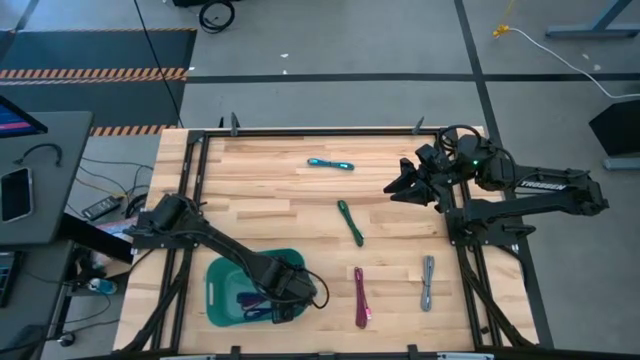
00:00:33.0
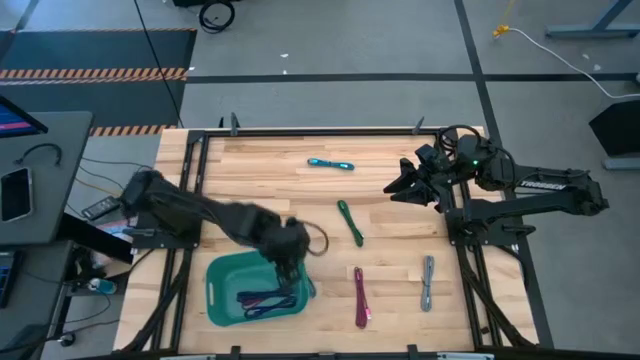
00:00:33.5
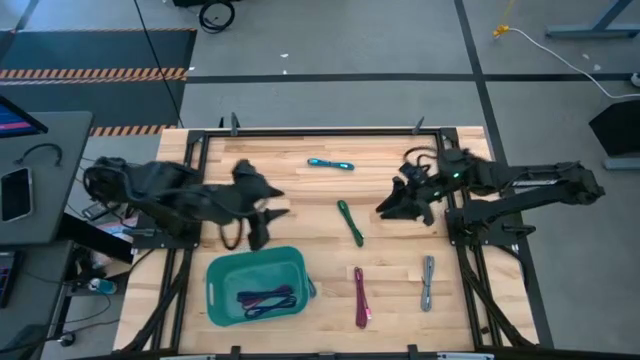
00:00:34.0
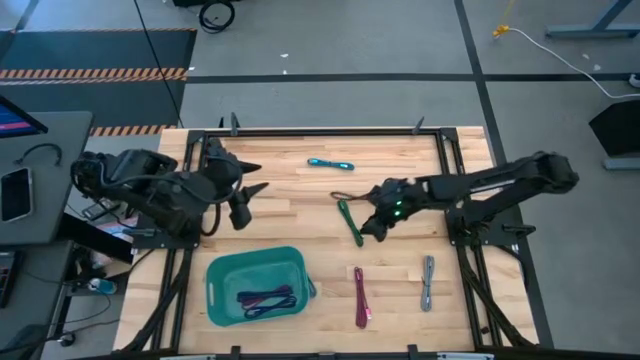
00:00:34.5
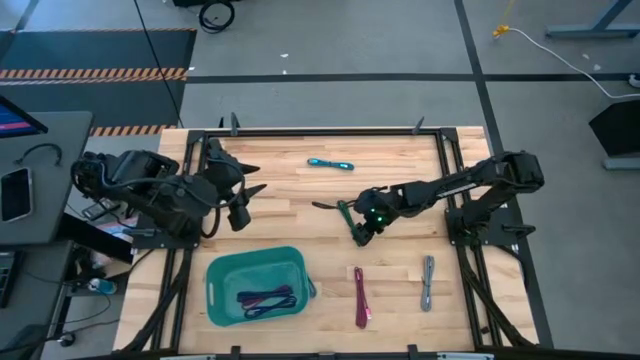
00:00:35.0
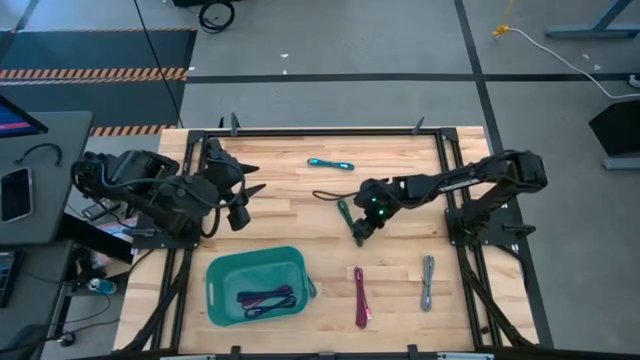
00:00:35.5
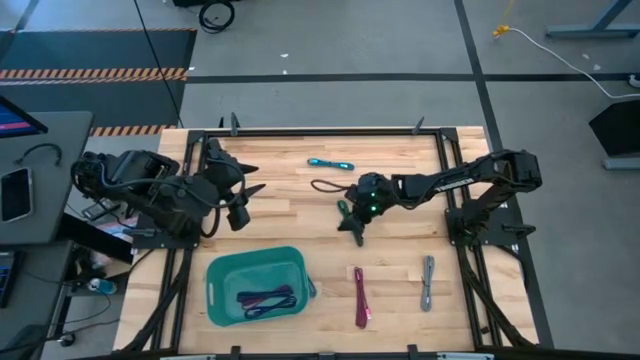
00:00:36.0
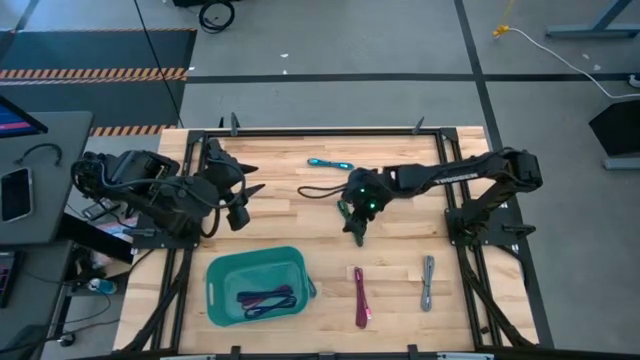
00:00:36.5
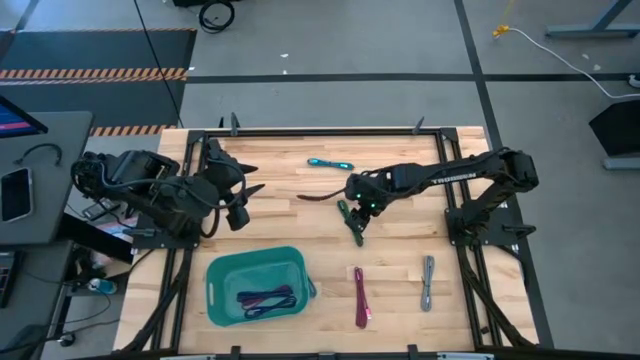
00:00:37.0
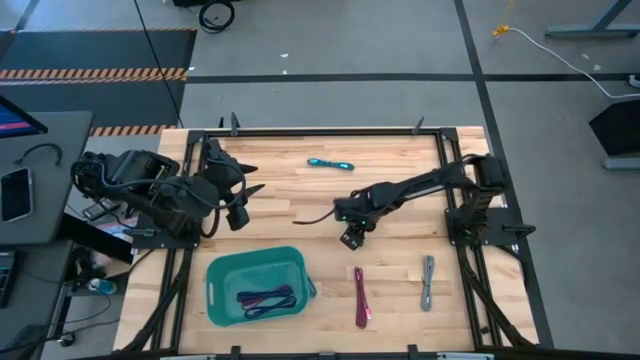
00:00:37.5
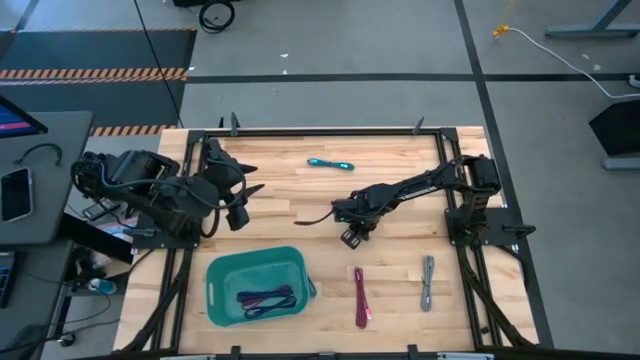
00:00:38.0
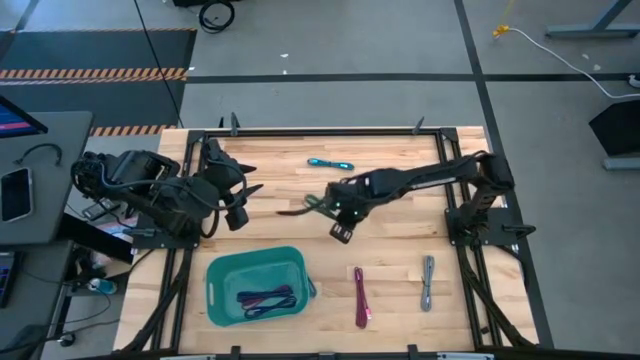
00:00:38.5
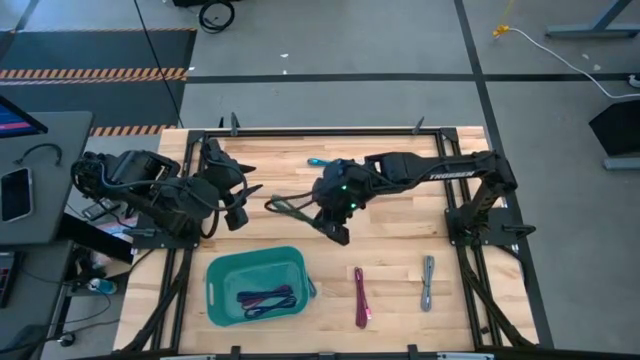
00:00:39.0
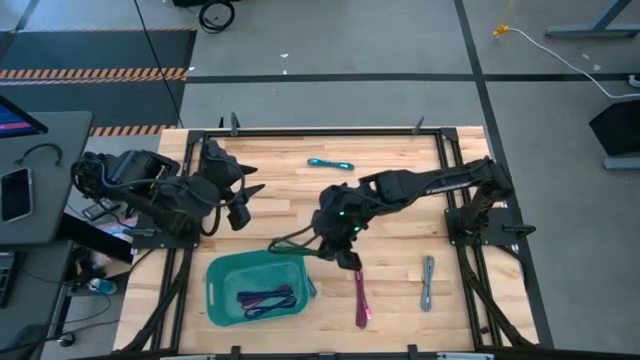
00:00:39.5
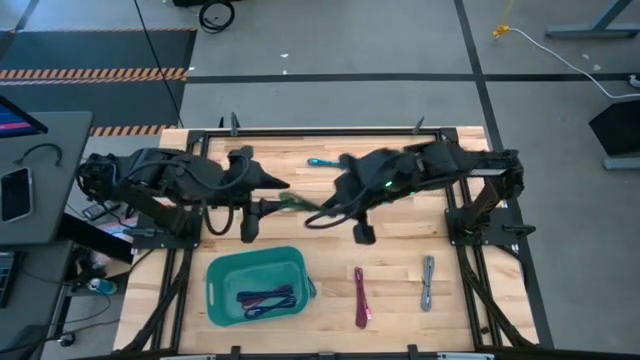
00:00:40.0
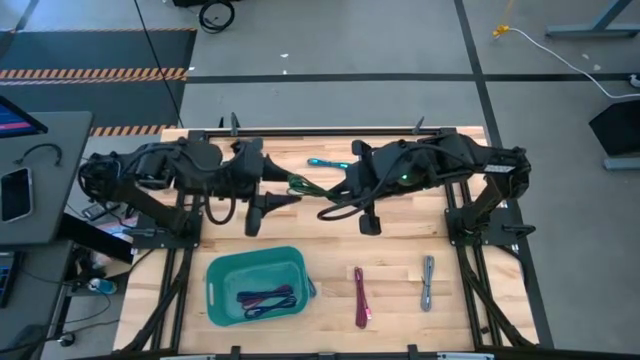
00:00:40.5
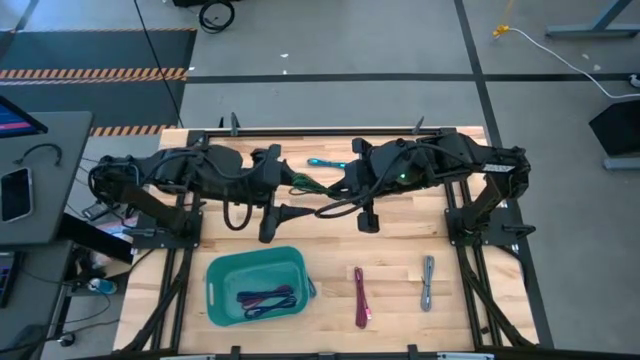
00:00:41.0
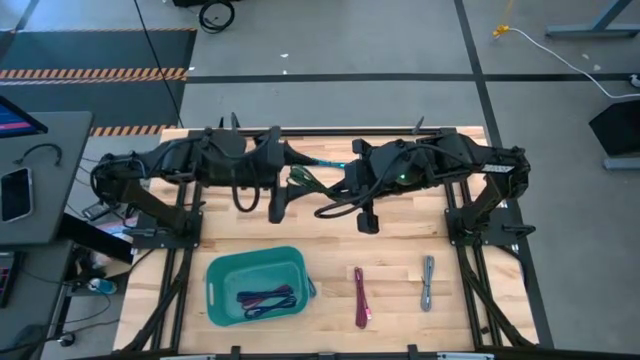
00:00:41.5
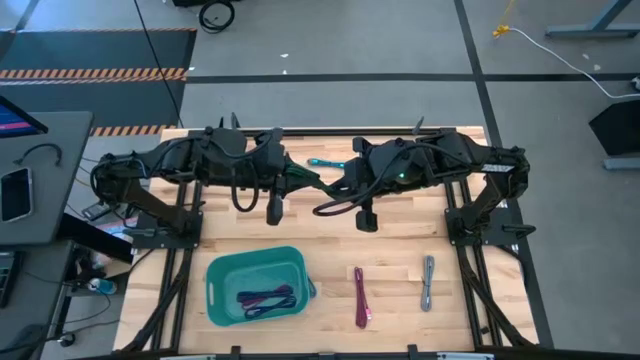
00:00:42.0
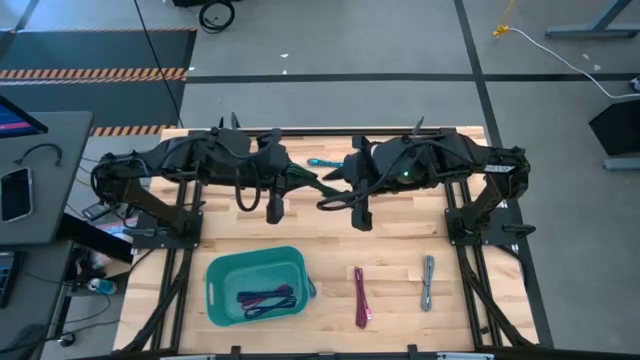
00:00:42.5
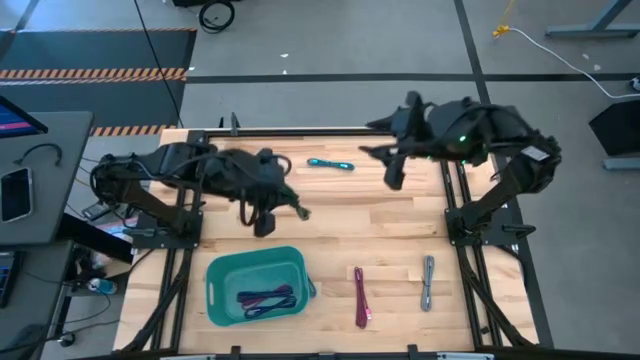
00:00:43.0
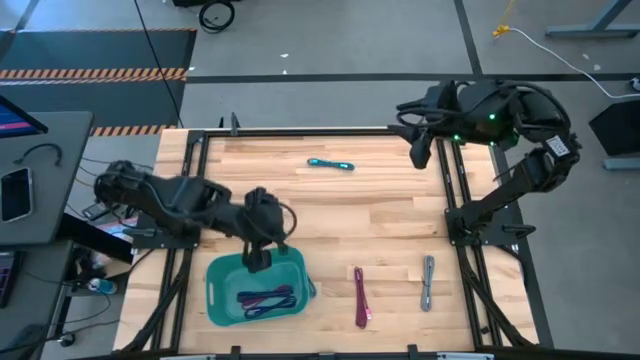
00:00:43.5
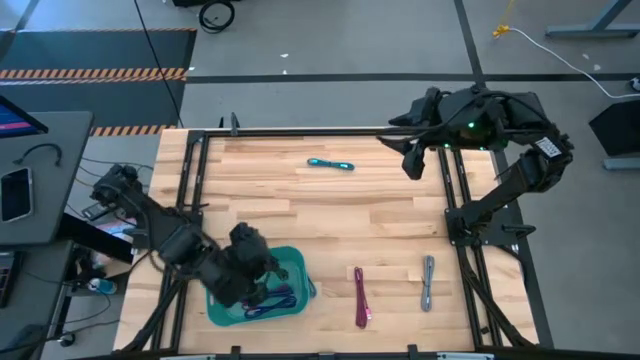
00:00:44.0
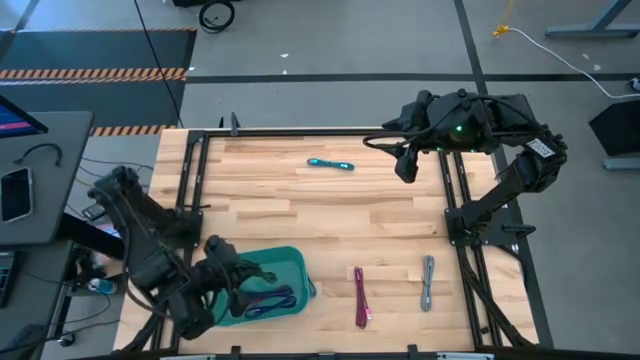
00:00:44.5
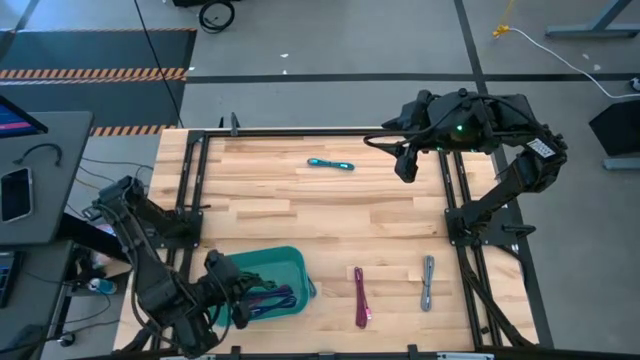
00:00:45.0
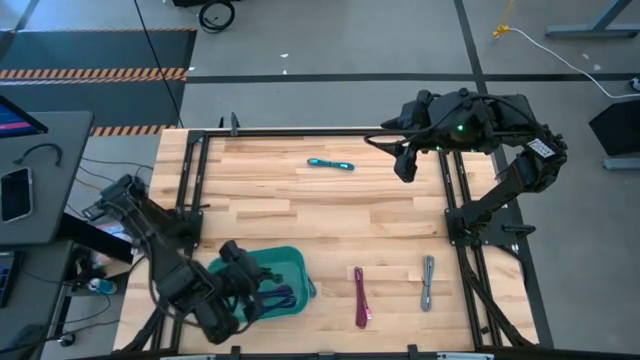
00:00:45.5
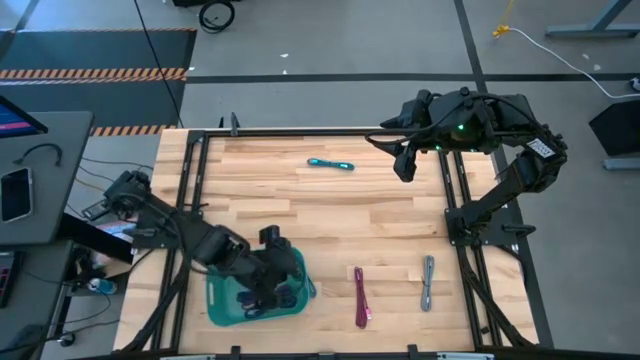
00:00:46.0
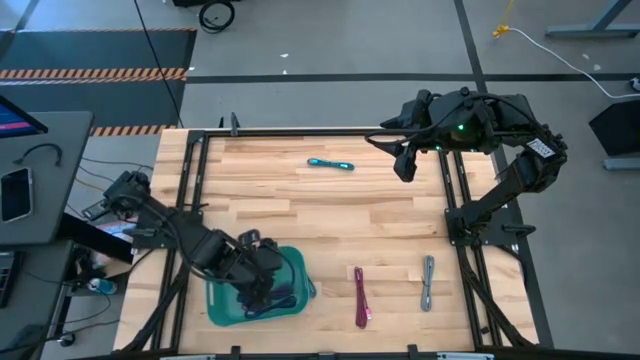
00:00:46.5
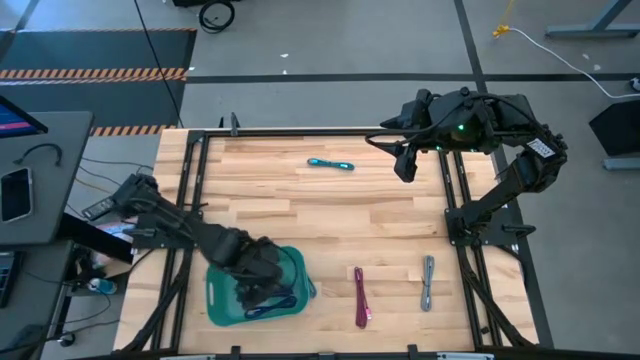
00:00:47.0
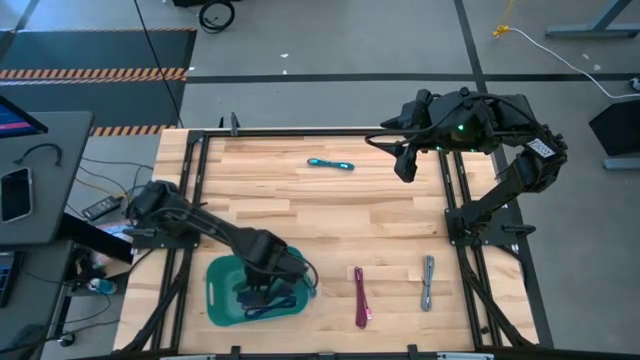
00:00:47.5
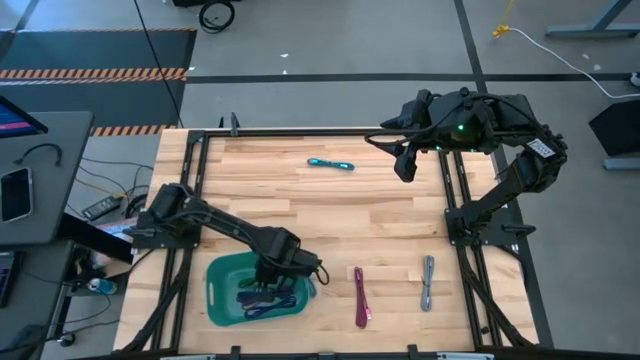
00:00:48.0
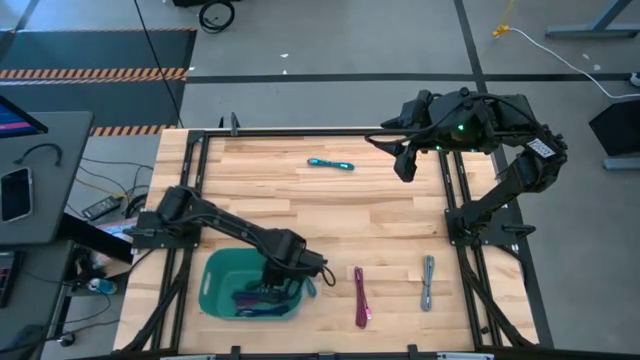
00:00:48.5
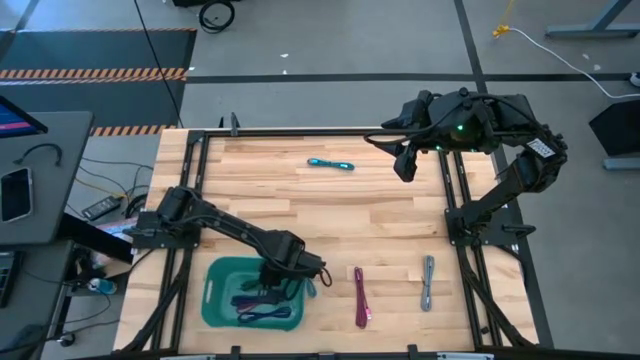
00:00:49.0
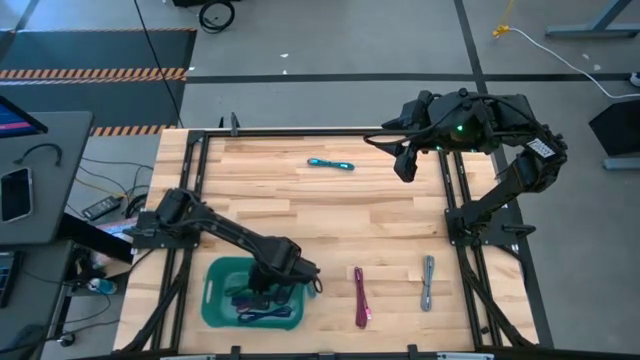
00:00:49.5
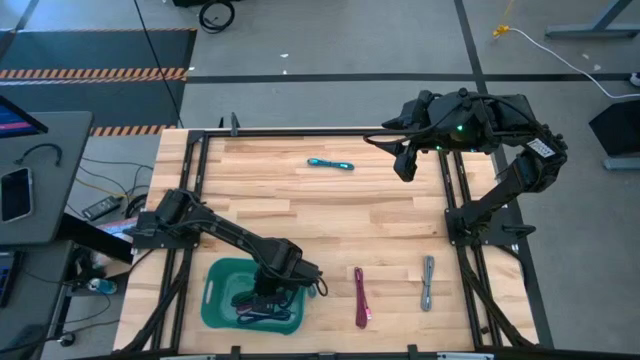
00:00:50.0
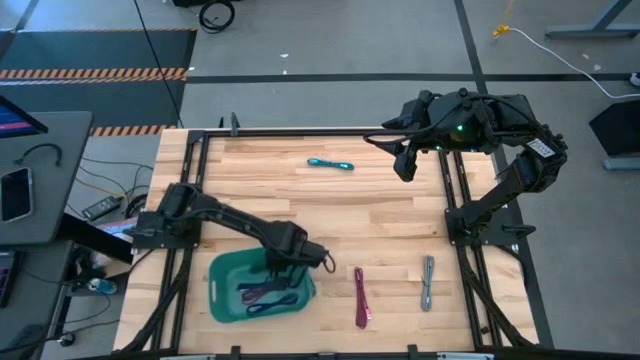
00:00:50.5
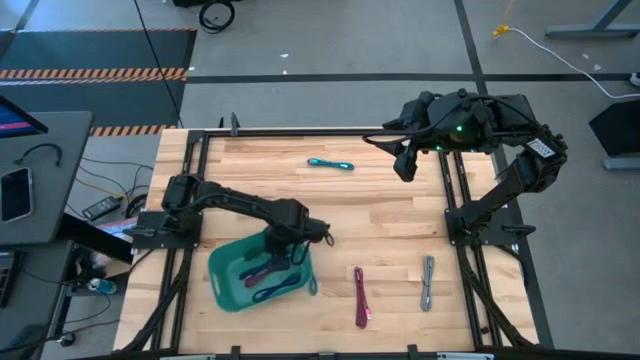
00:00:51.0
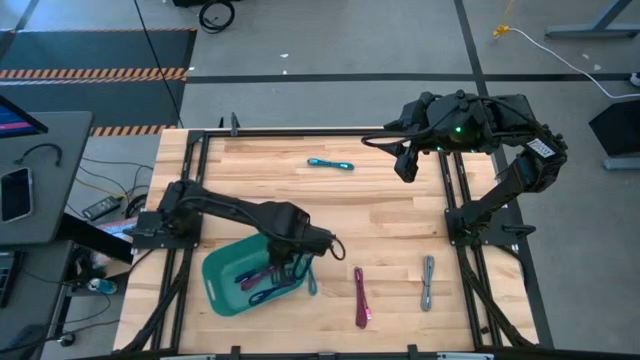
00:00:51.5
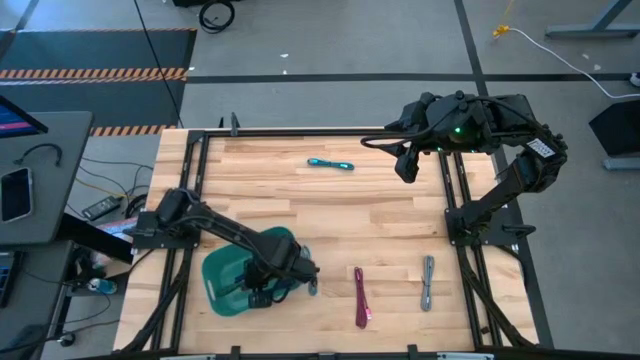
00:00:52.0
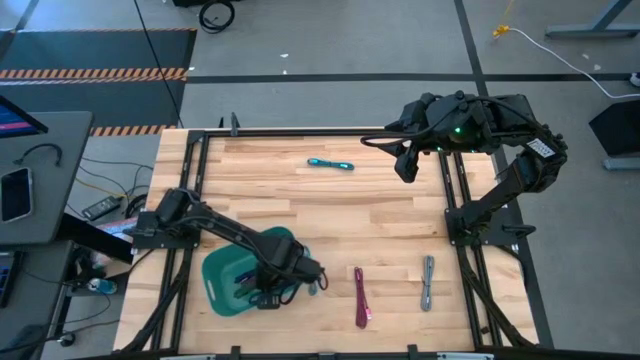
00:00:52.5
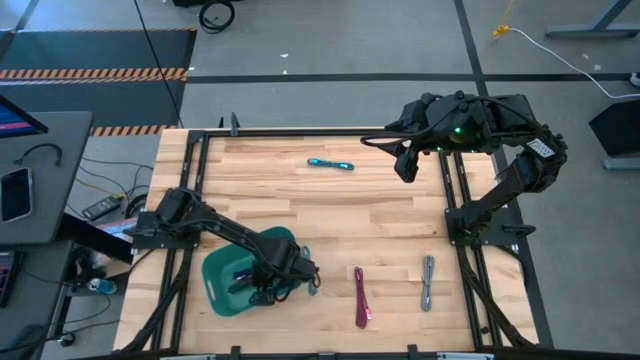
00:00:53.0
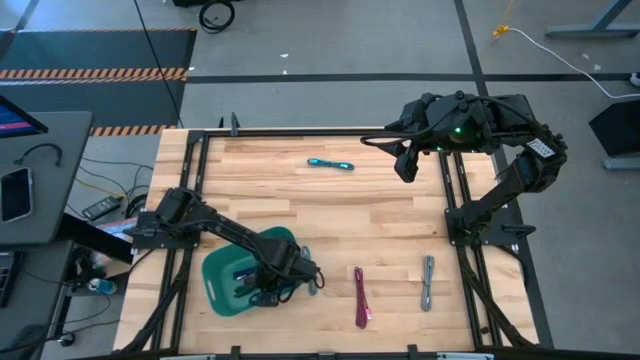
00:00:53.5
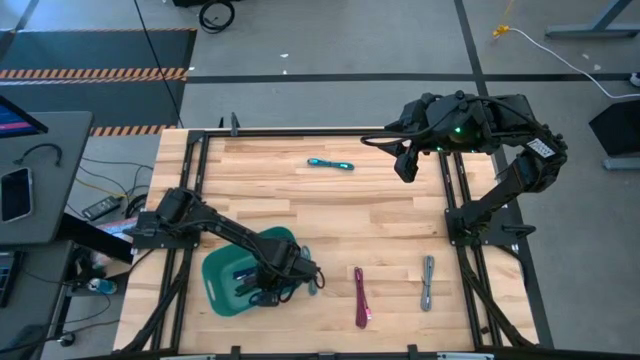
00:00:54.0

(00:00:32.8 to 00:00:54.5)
Task: Pick and place USB-C Cables
Put the green charger cable into the green bin
